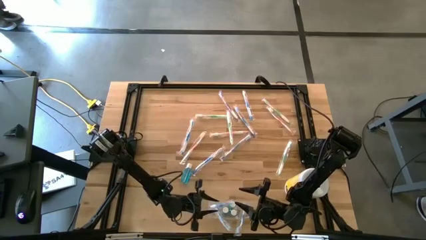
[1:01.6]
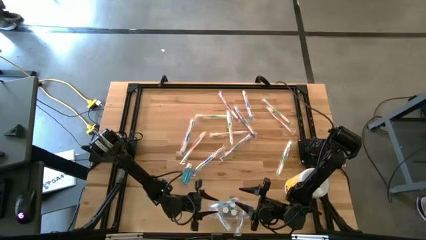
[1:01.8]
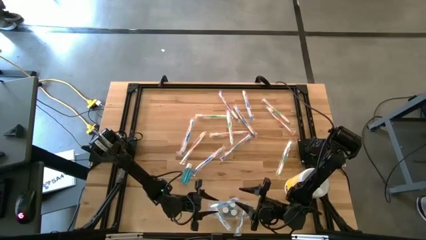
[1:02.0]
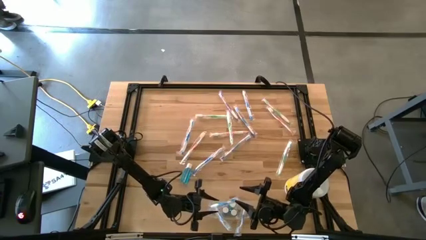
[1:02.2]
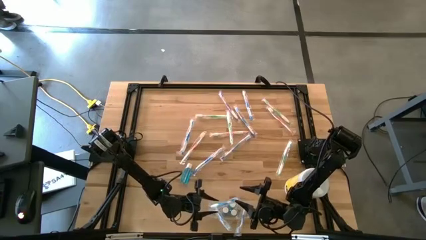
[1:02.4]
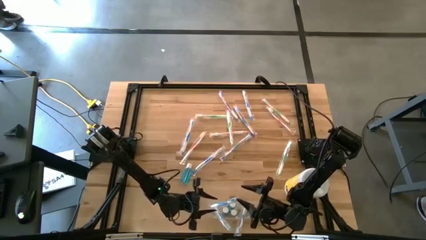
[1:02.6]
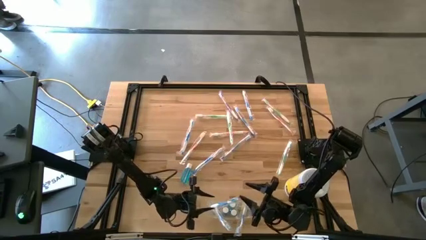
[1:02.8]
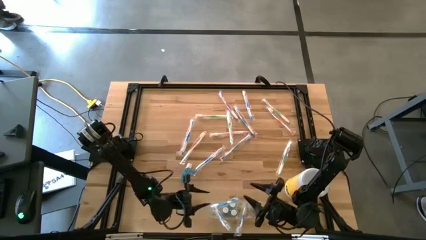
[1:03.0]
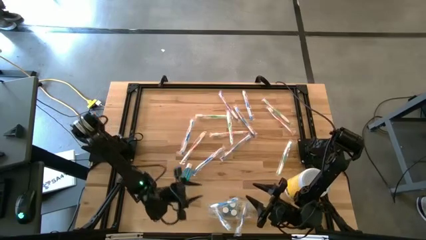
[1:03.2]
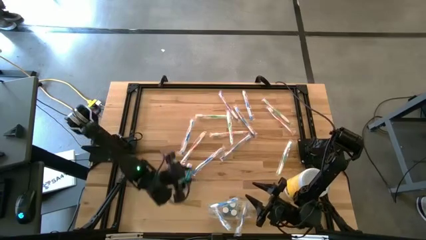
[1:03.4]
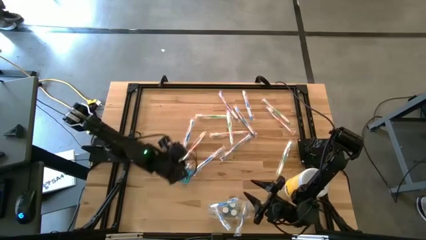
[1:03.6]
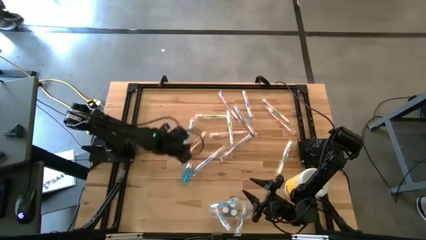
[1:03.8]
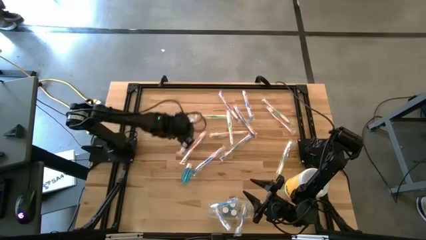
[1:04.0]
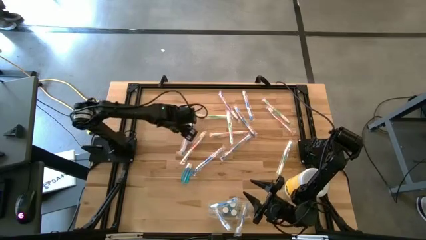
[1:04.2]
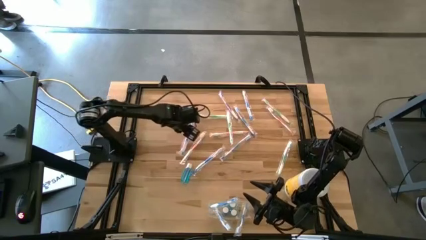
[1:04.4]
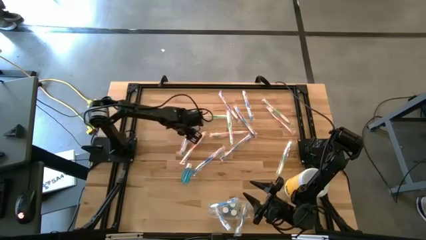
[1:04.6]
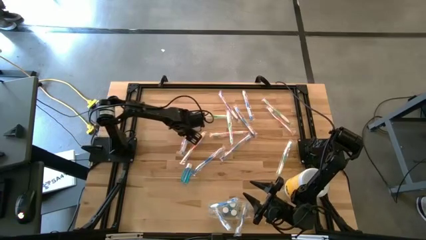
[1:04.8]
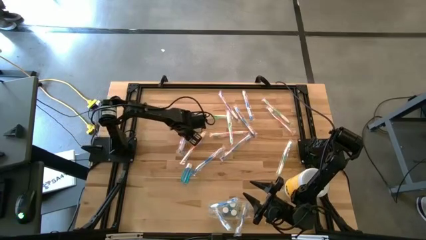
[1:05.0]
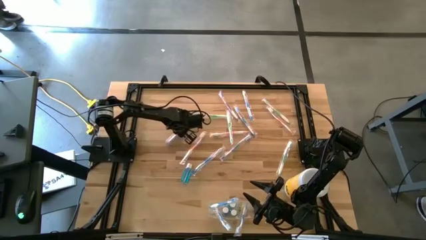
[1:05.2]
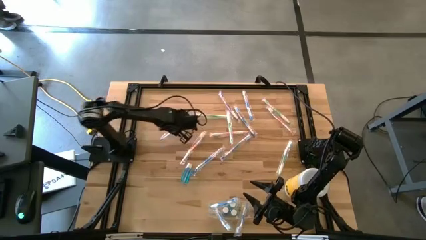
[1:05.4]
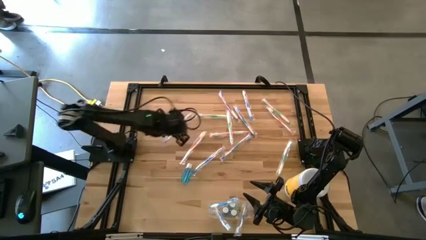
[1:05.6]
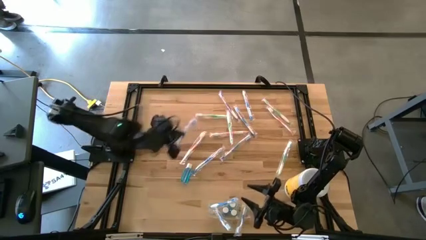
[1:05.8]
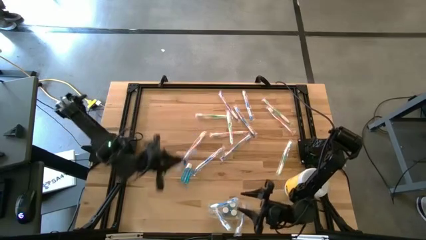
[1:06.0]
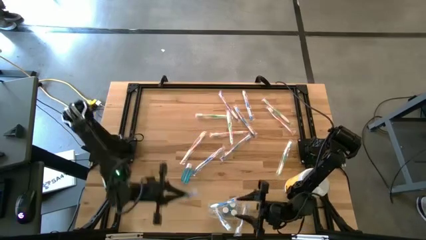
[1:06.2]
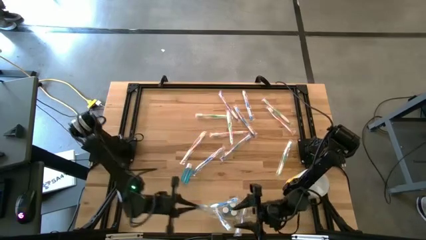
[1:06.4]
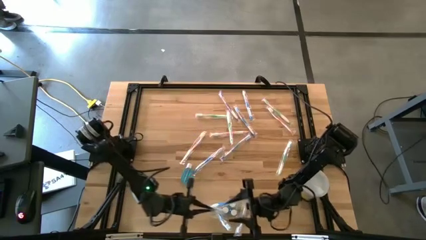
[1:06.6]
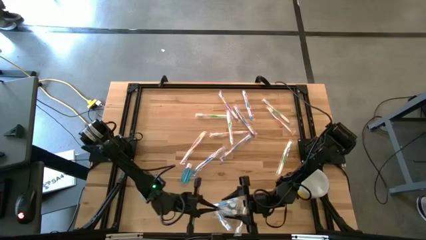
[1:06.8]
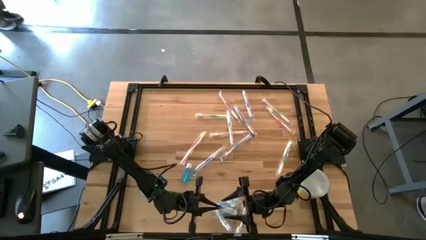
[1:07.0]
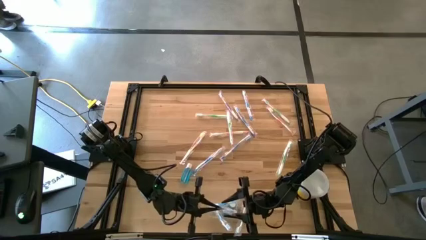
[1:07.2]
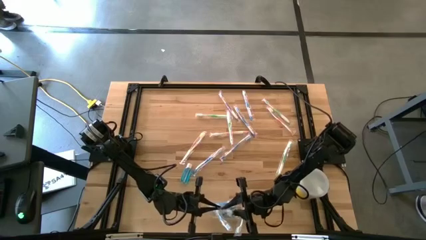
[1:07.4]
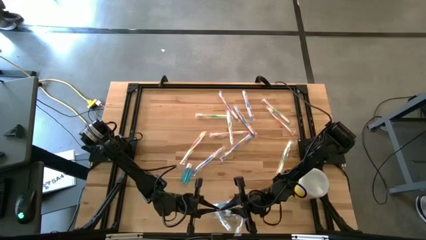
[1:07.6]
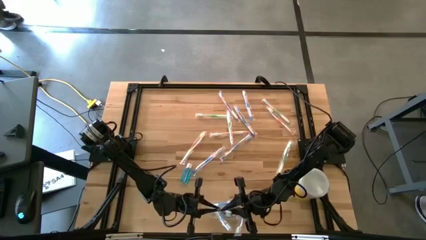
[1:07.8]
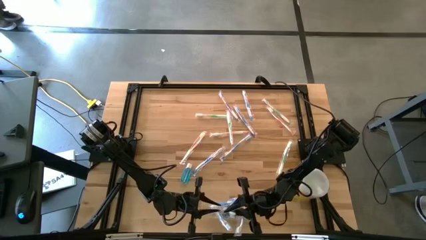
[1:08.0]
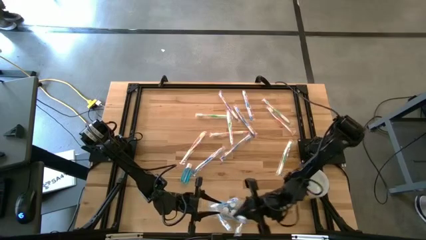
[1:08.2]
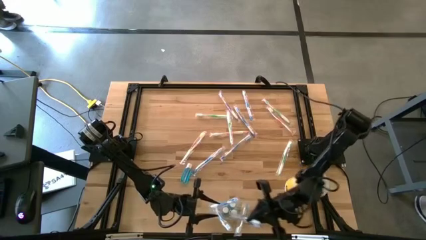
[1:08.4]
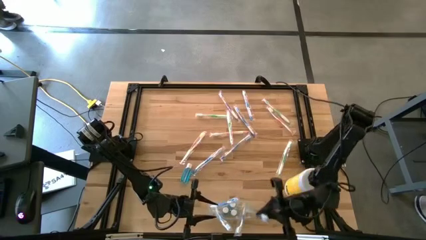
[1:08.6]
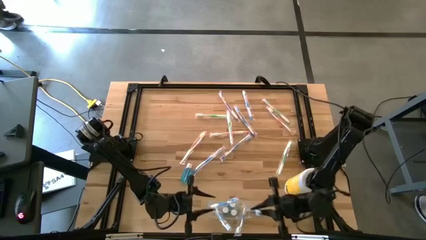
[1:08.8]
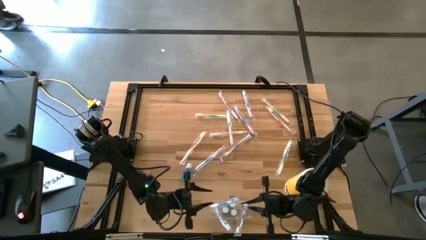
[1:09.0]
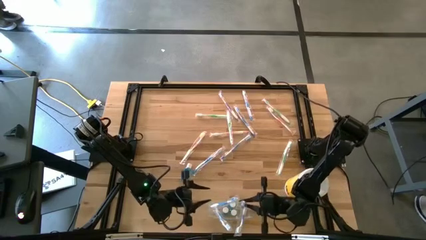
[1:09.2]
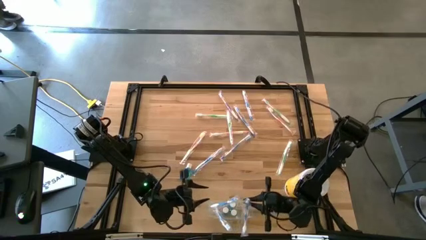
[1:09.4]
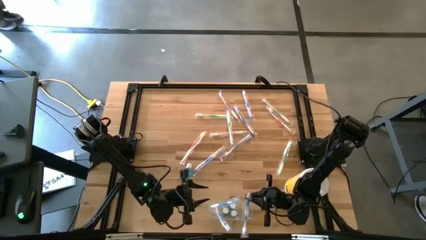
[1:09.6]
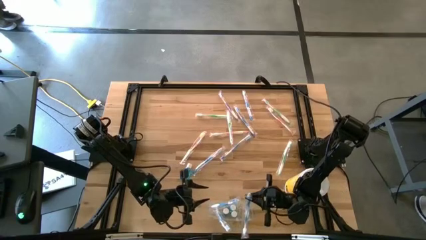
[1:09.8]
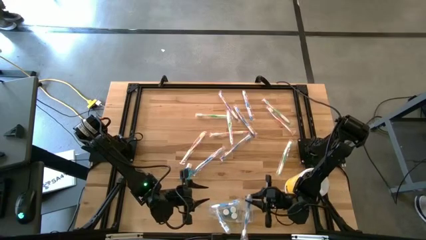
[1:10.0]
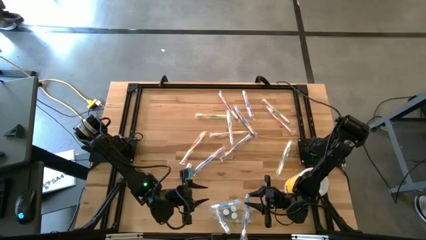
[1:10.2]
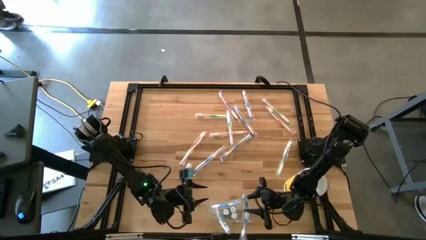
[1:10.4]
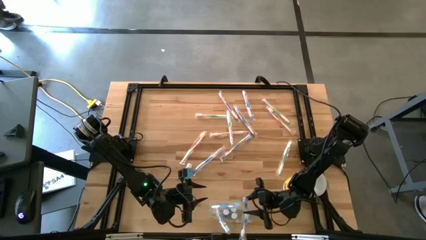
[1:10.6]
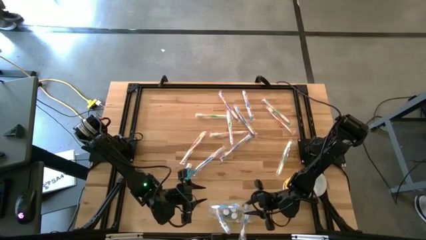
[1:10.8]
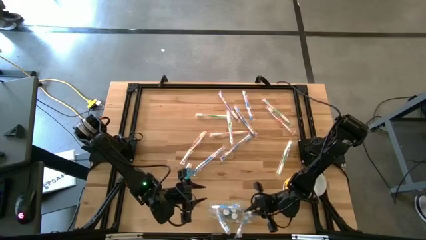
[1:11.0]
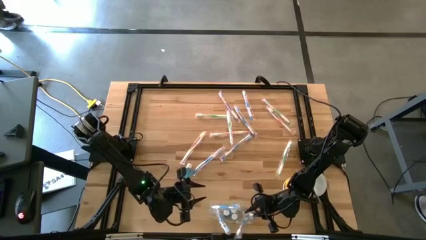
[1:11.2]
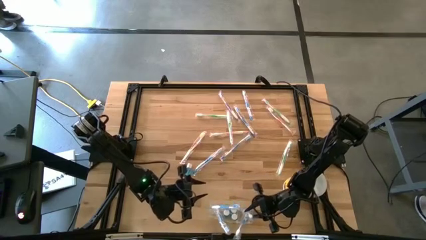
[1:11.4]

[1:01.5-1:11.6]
Task: Pick & Place toothbrushing station
Put the blue toothbrush into the transparent organizer

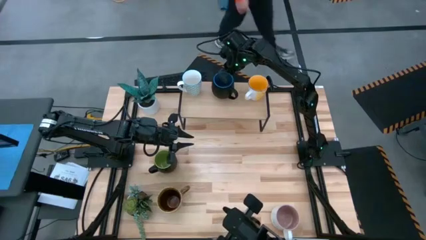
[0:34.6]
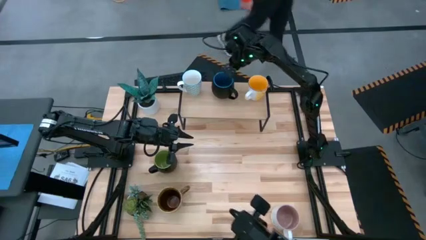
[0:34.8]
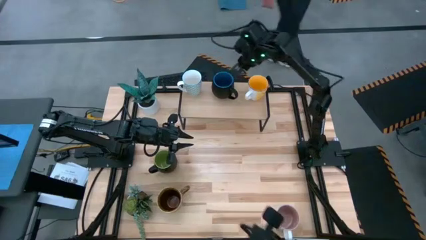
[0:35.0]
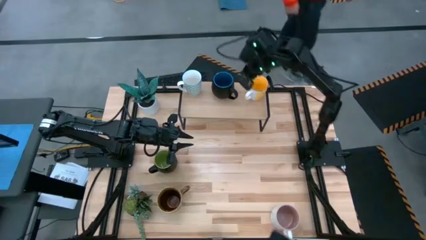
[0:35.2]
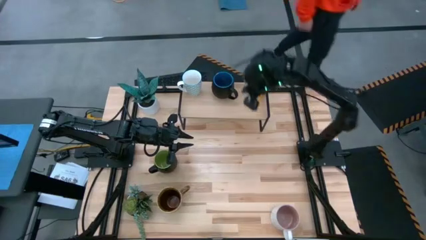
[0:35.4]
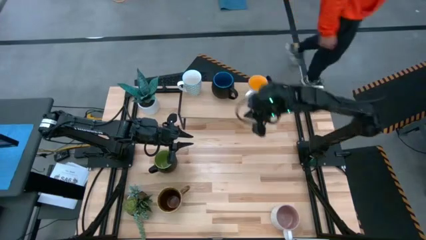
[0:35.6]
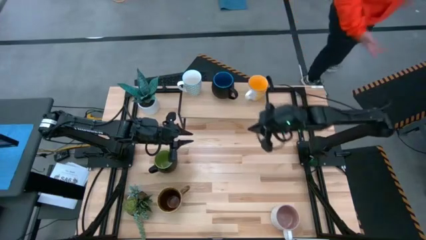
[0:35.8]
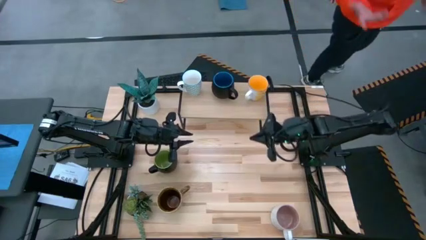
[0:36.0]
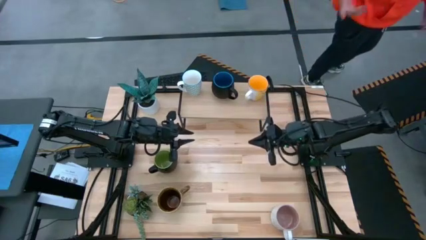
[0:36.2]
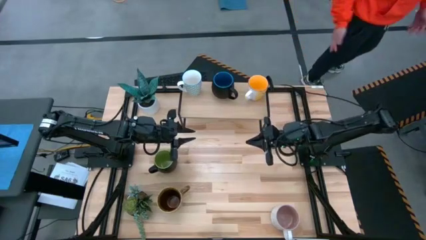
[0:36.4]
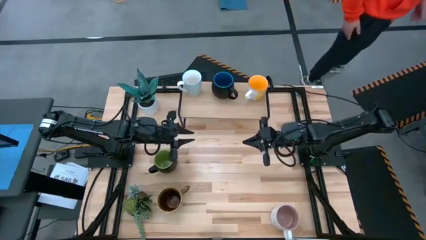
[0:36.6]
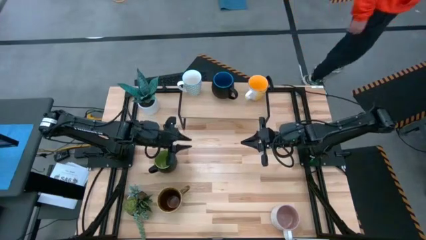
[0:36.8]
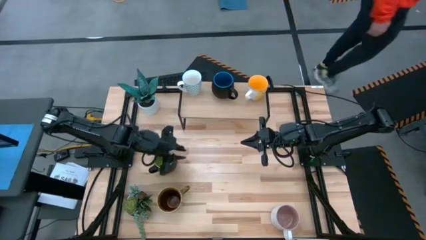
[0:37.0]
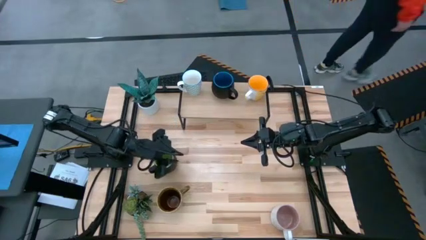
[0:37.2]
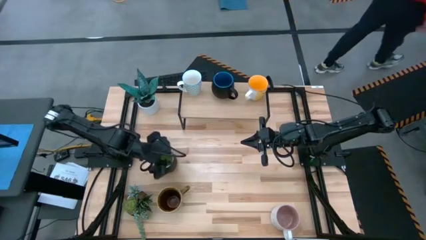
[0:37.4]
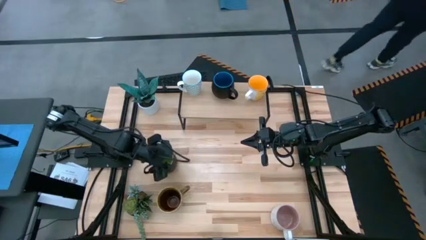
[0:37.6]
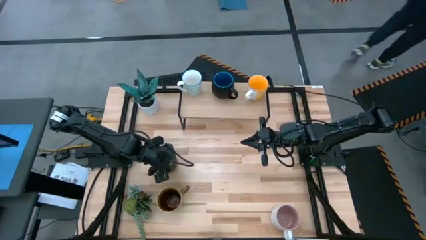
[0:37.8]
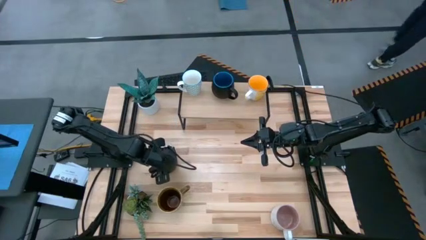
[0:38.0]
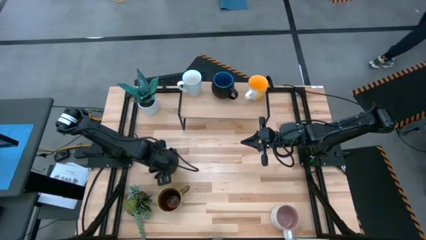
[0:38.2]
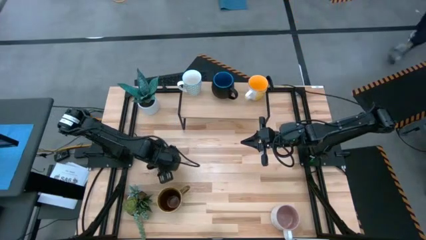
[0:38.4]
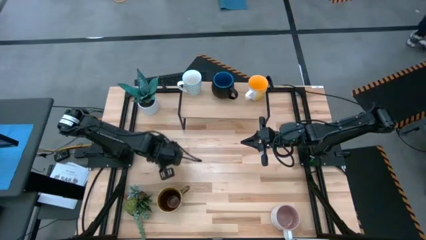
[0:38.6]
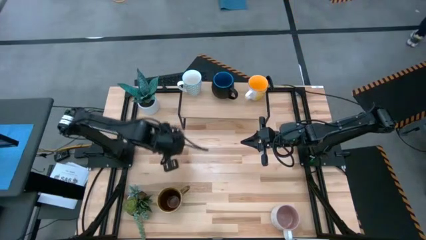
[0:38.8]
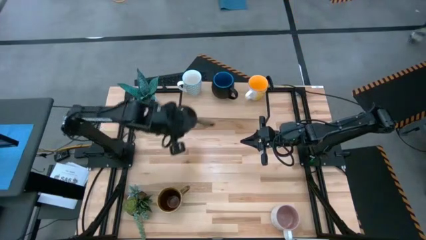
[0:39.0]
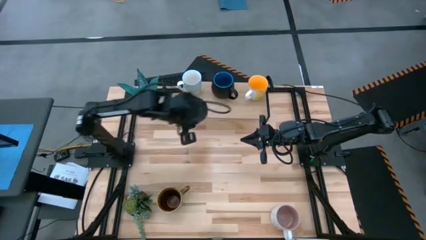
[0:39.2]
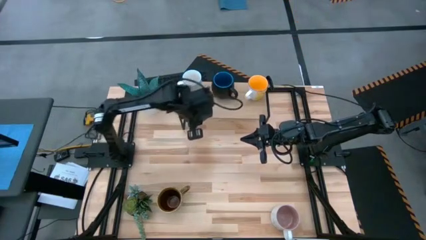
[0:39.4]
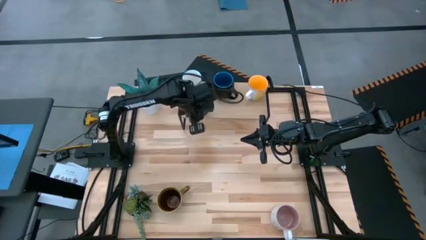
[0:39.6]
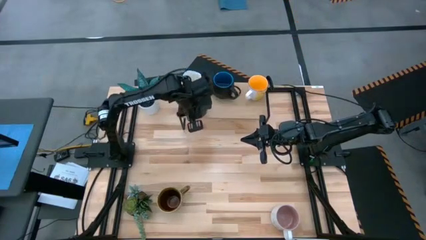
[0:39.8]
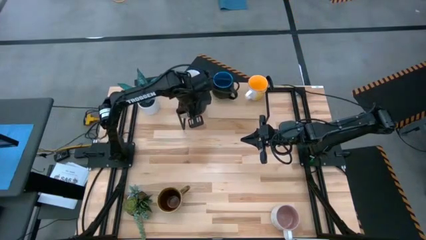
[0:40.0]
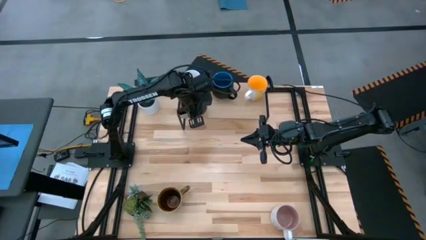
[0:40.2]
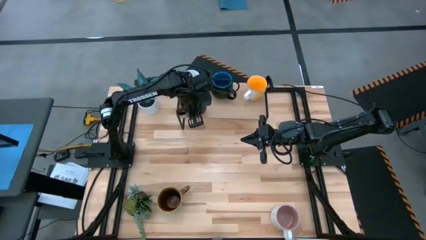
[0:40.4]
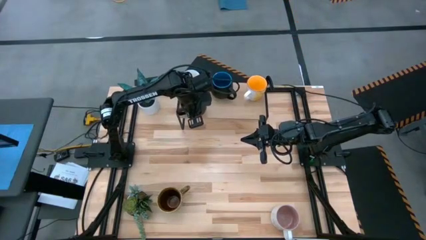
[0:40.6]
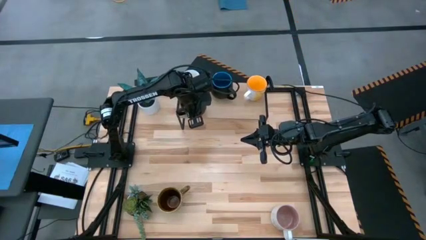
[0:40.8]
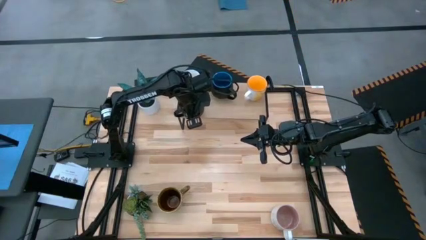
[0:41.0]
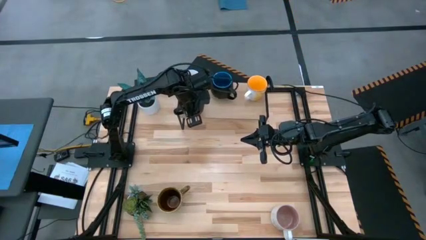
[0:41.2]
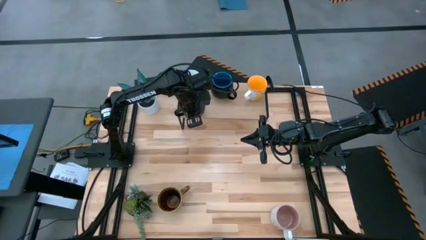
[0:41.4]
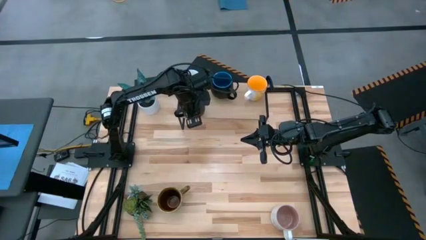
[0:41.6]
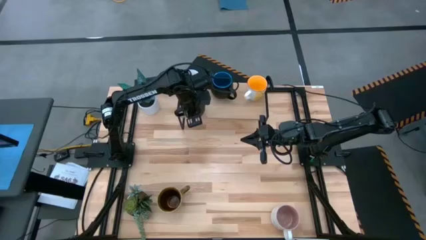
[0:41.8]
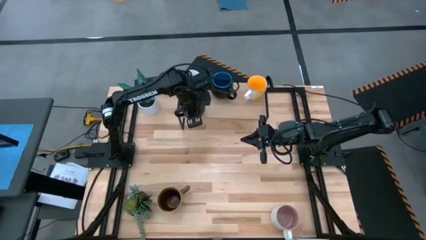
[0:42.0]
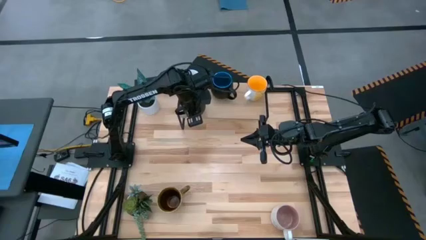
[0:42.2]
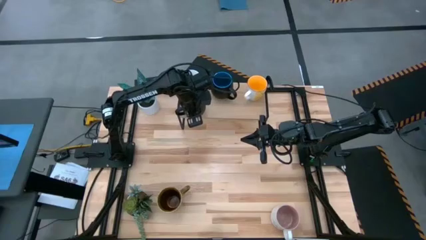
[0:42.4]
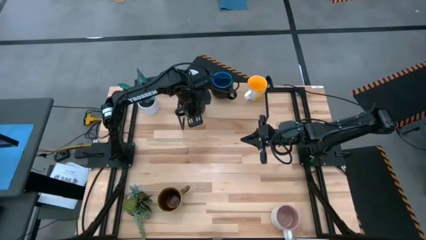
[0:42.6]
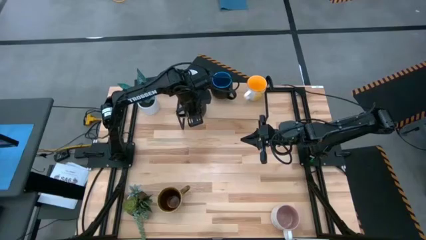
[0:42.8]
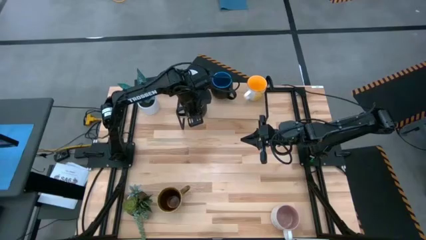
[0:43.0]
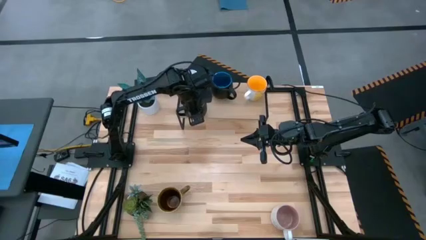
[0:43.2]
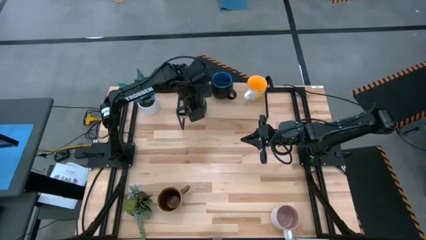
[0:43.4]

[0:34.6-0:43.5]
Task: Place coffee mugs
Put the black green mug on the shelf
